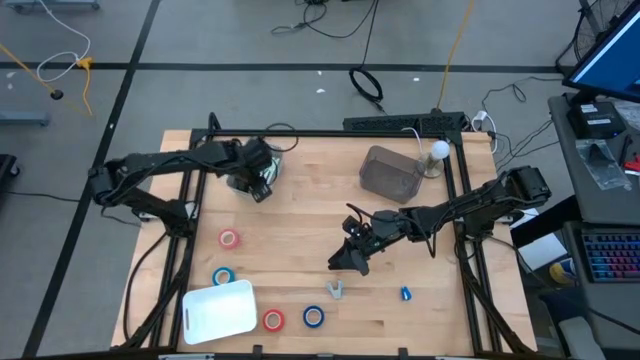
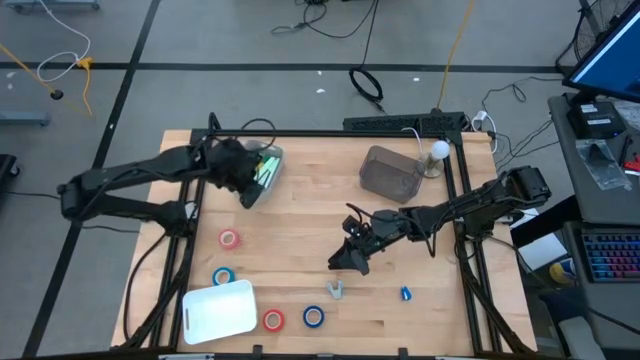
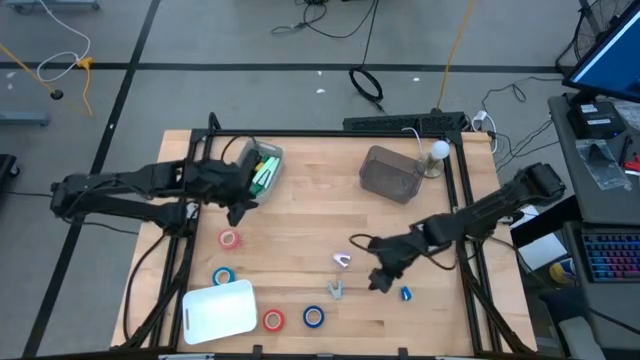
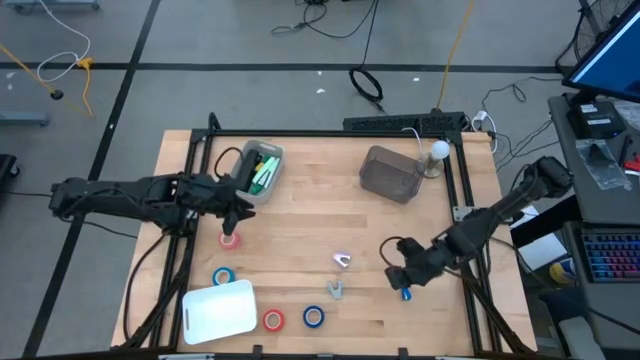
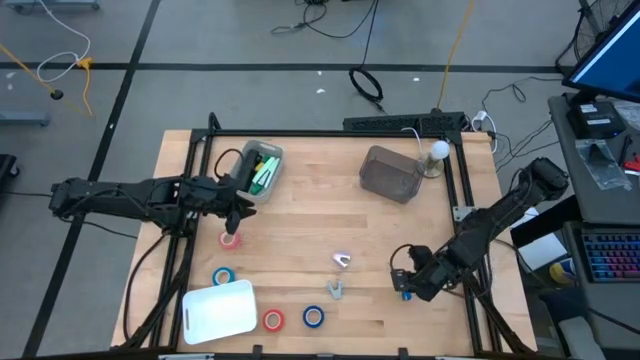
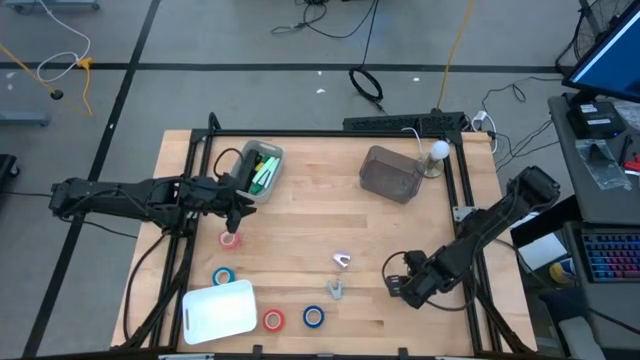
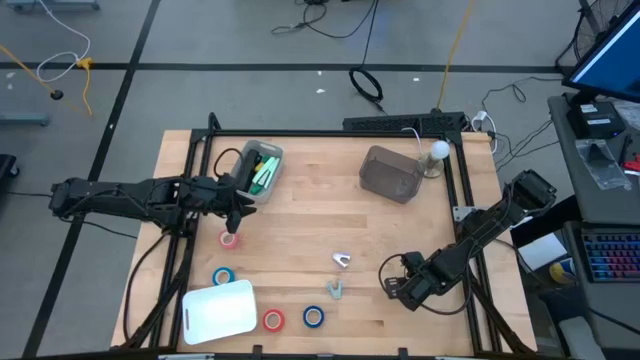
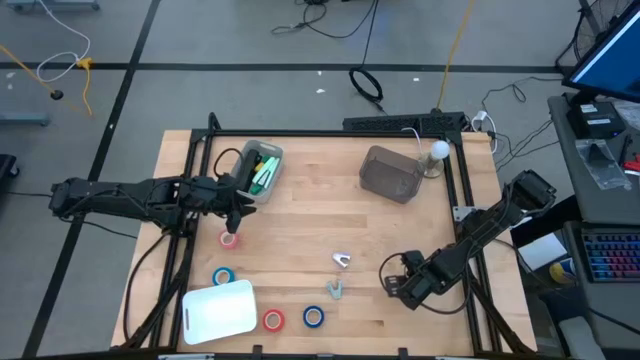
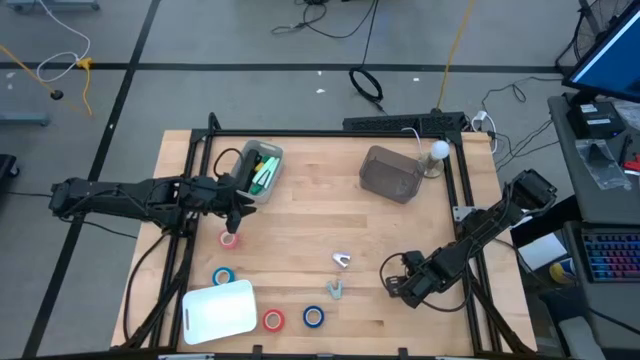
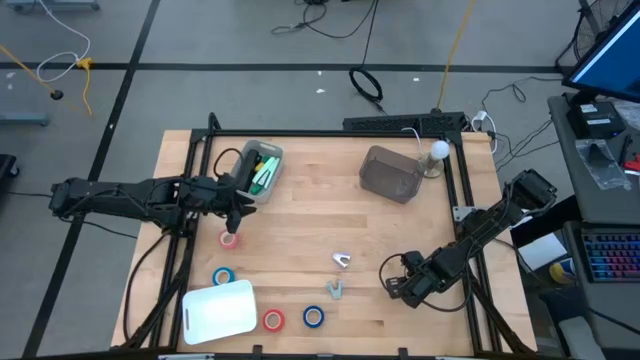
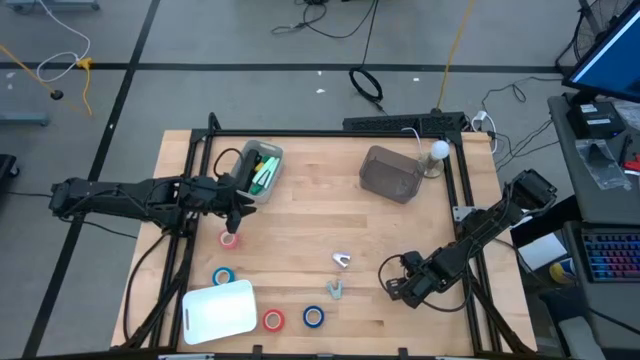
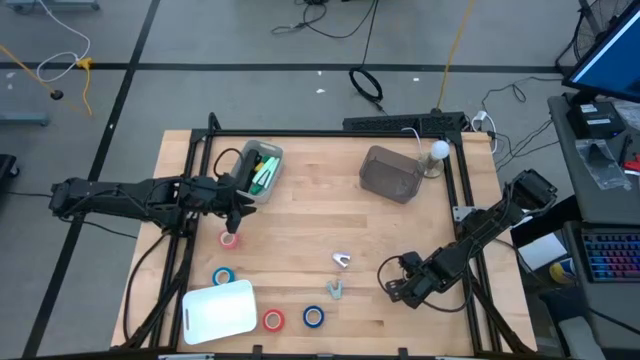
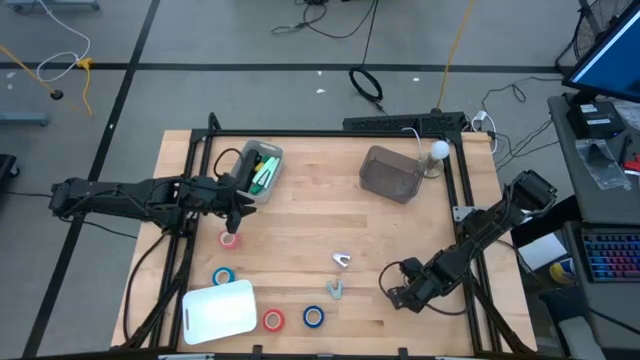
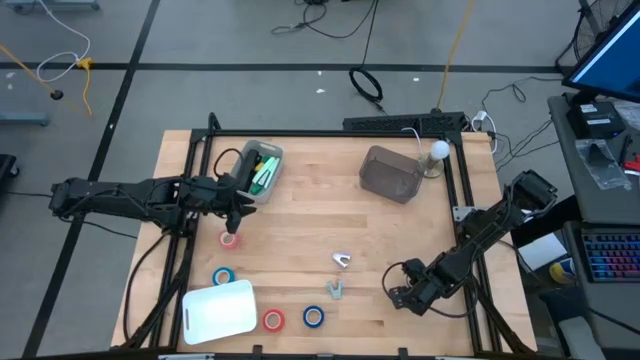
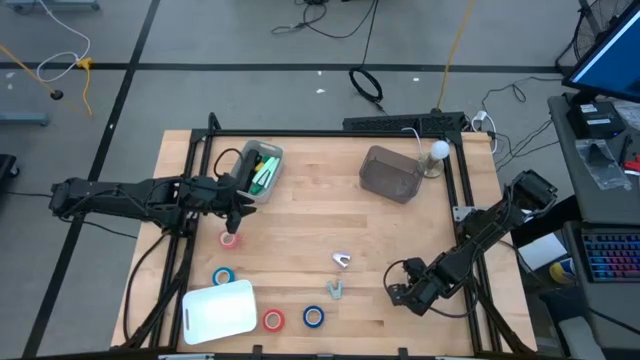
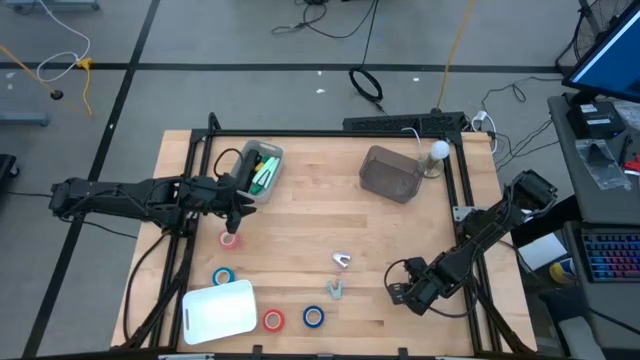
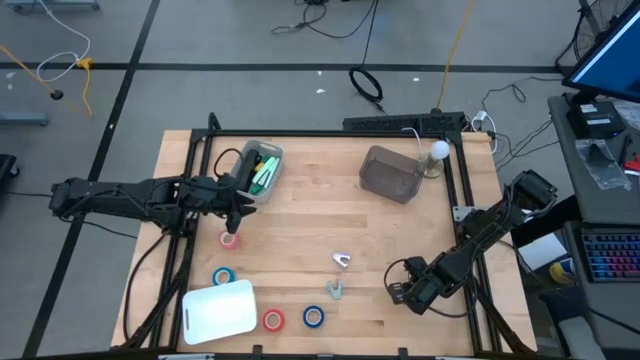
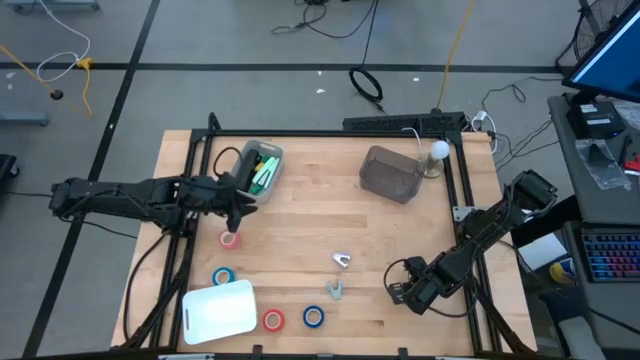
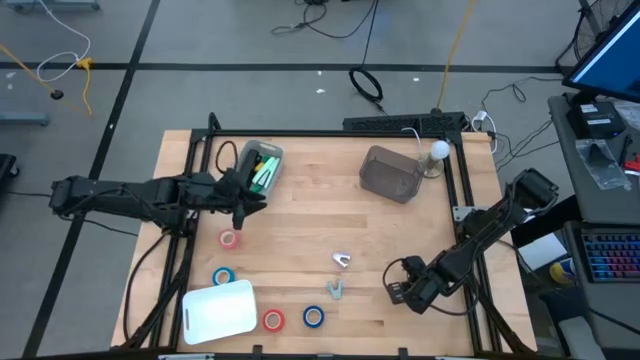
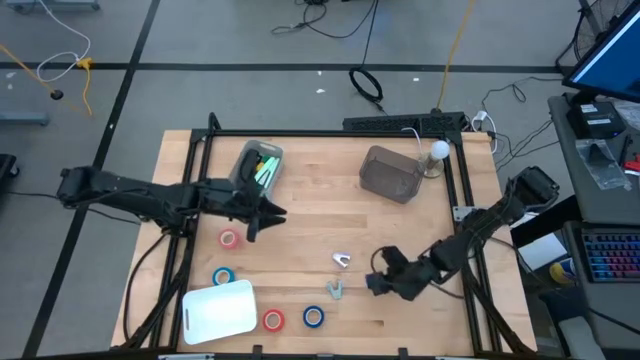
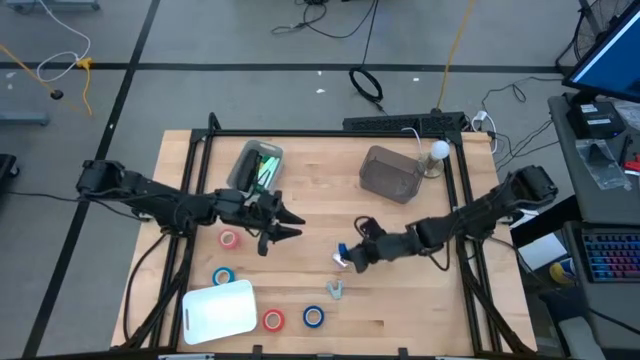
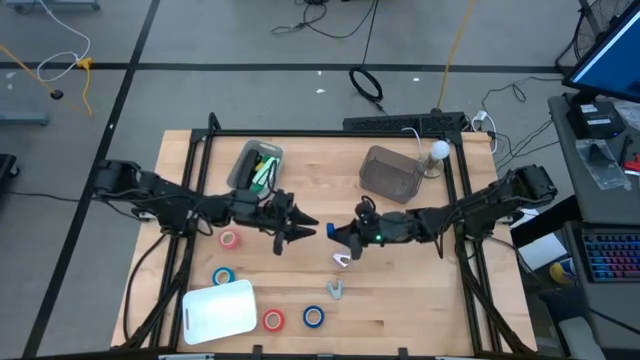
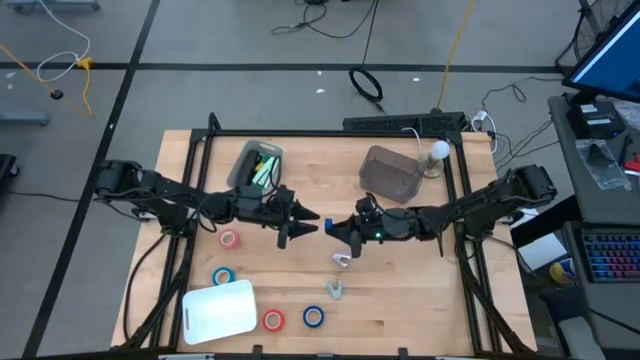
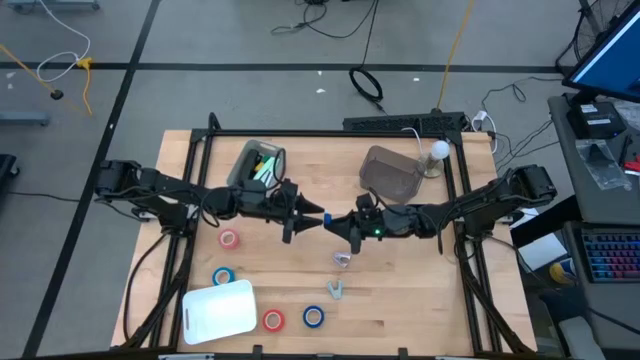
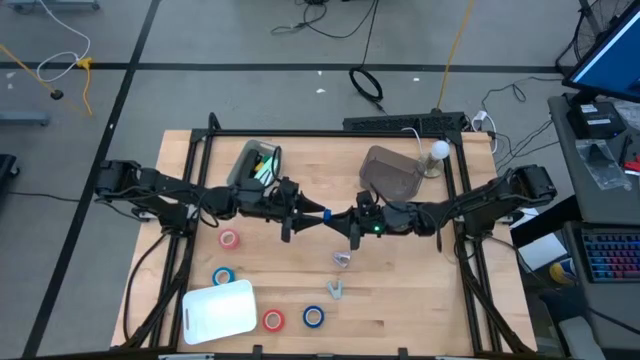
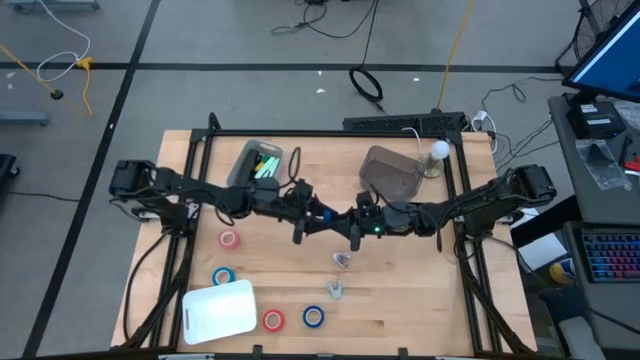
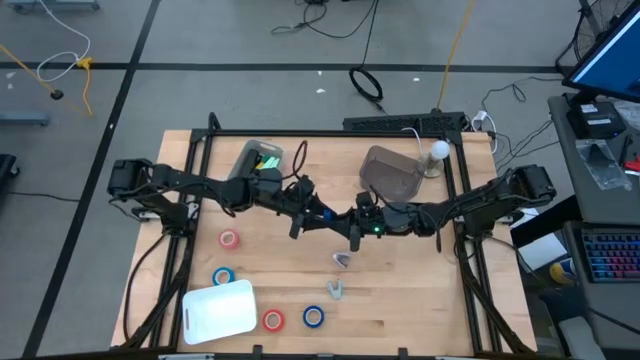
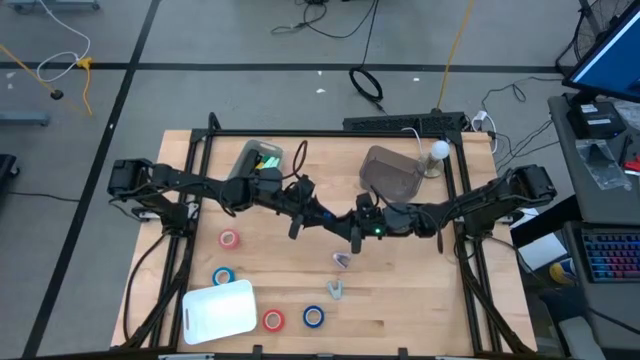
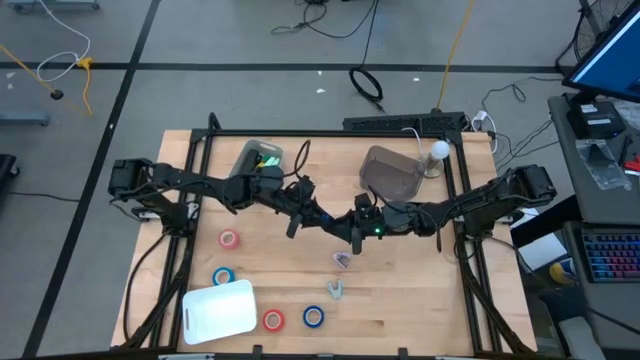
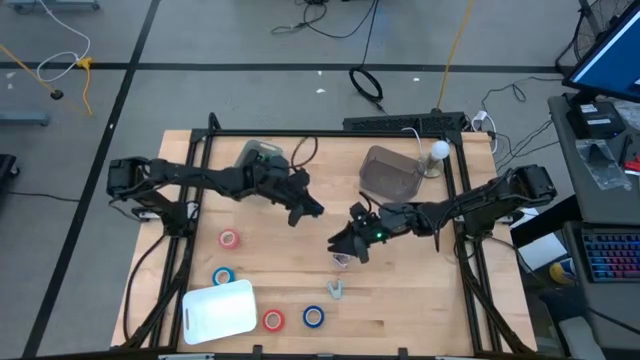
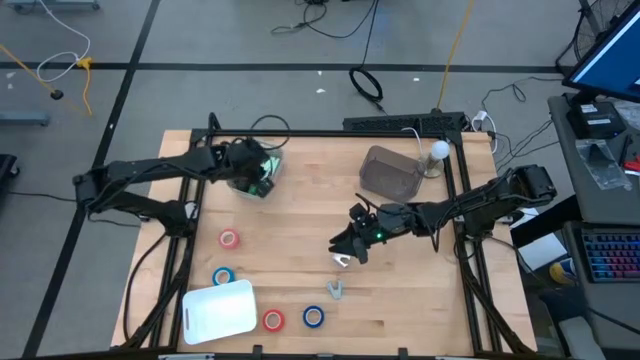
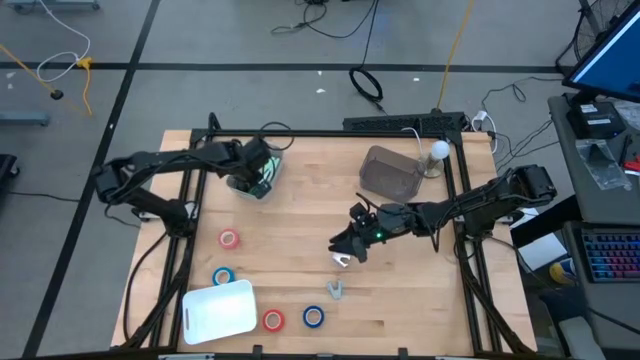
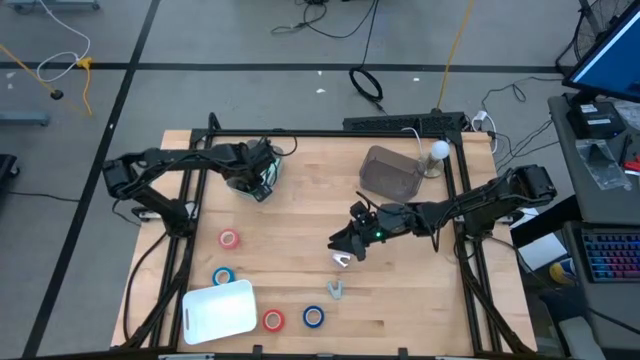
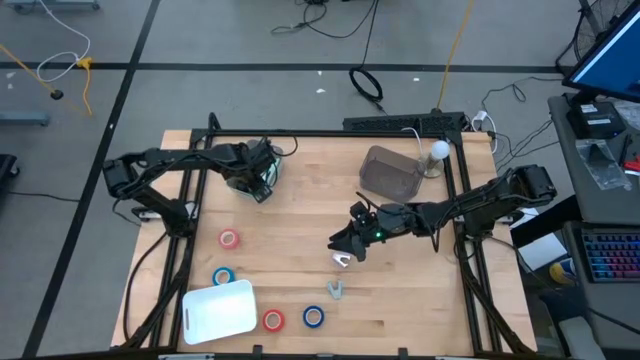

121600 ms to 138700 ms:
Task: Pick and place Stapler, Stapler remover, tape
Put the blue stapler into the gray bin

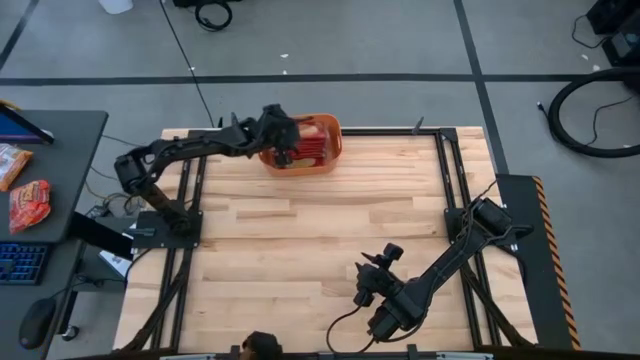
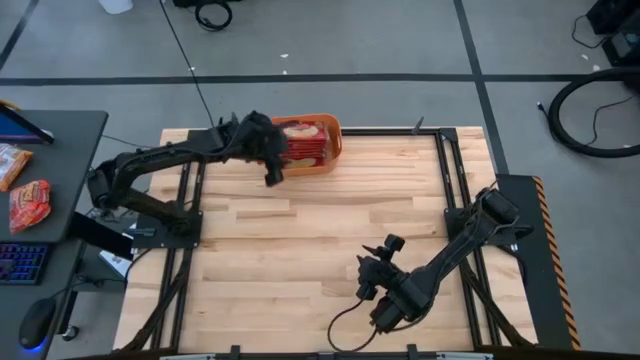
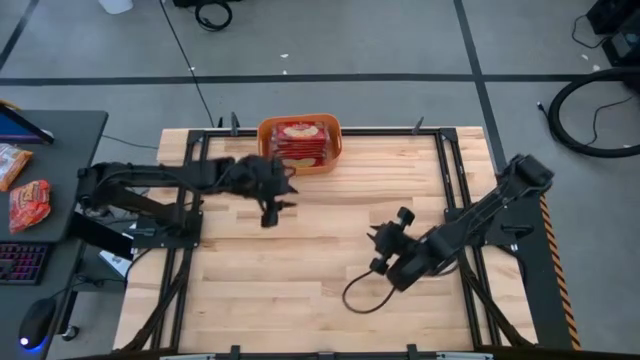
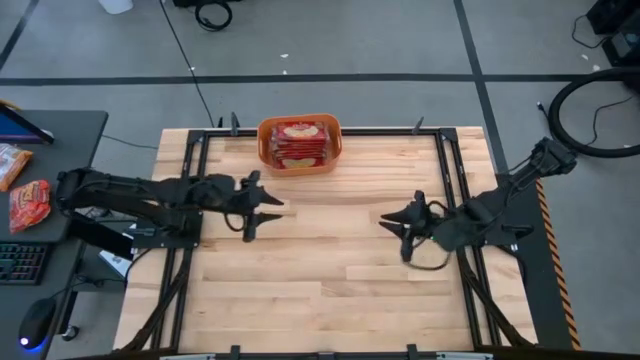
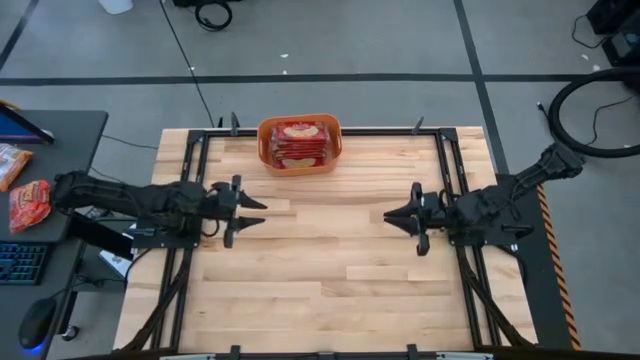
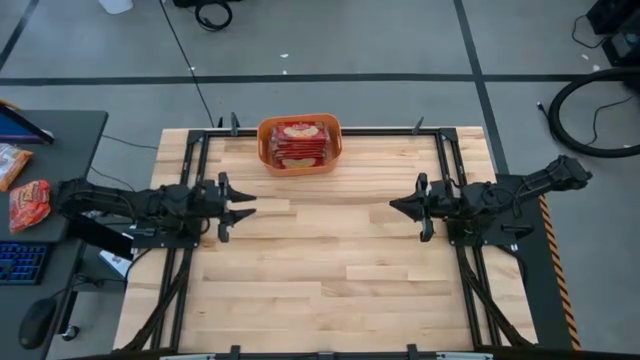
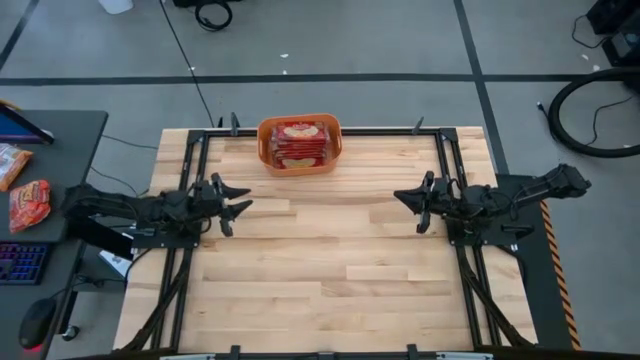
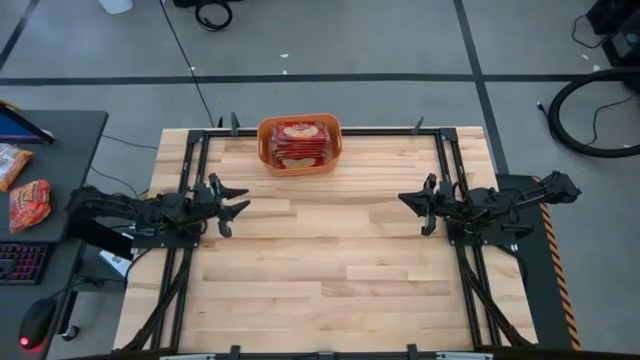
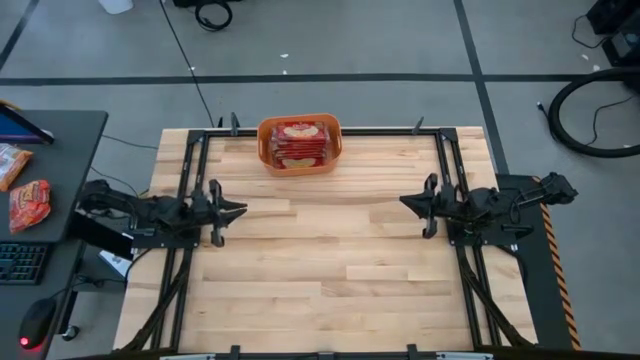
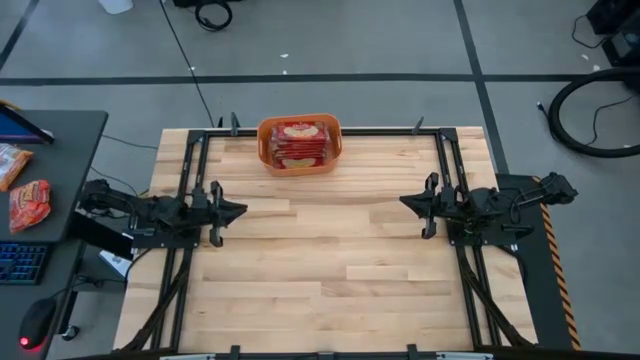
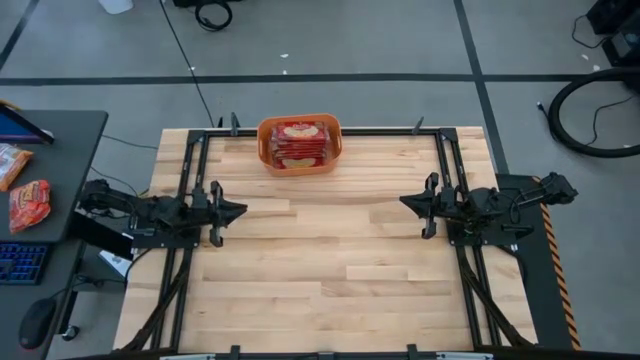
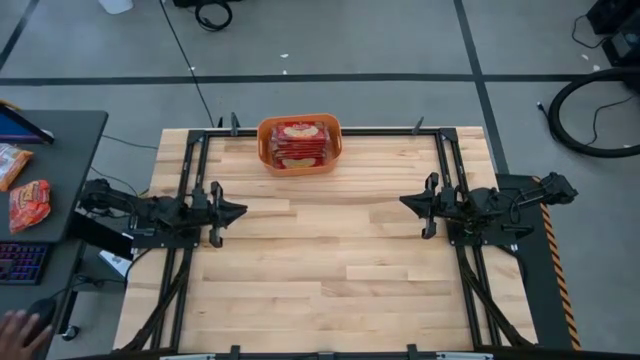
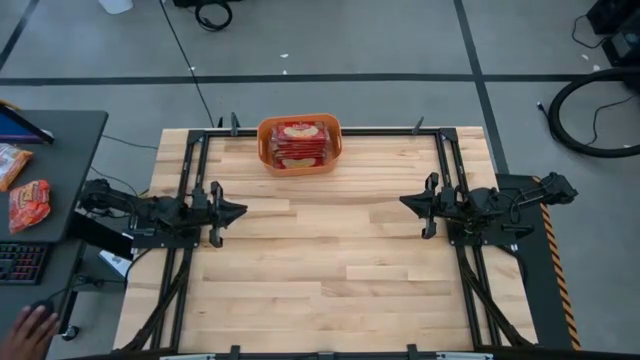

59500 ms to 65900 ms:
Task: Sort popcorn bags into baskets
Return to Home Position
